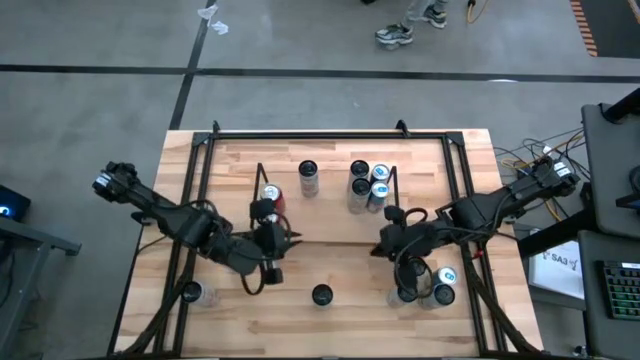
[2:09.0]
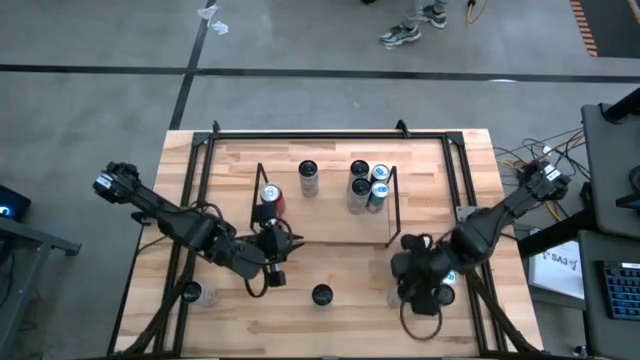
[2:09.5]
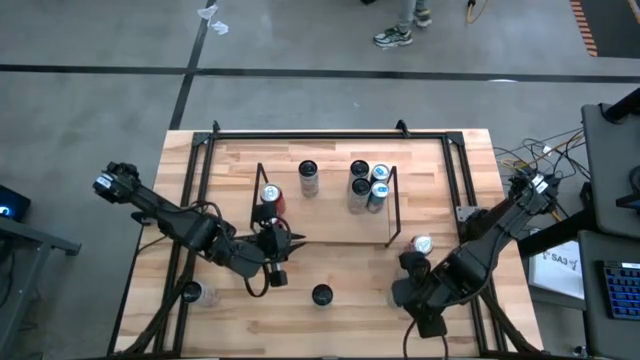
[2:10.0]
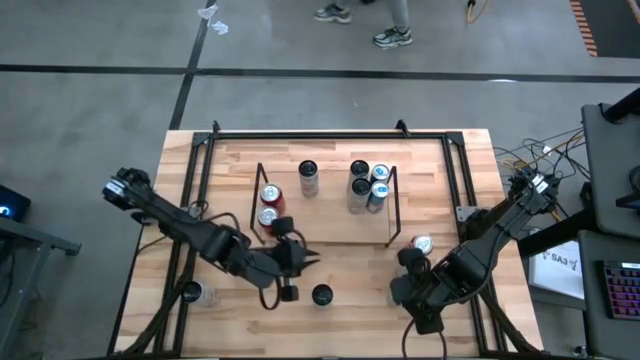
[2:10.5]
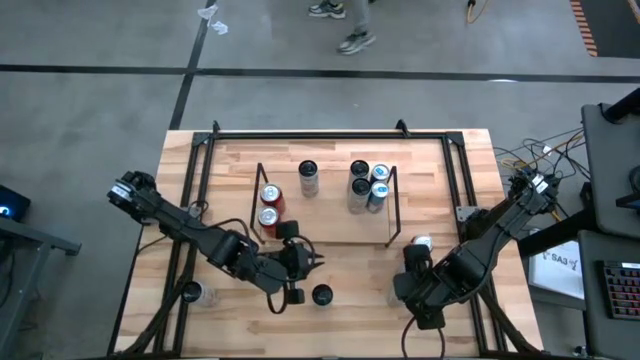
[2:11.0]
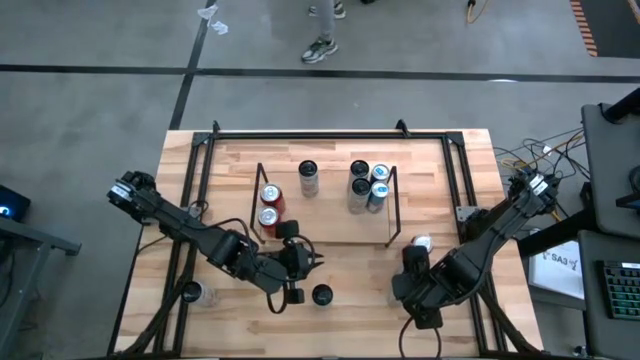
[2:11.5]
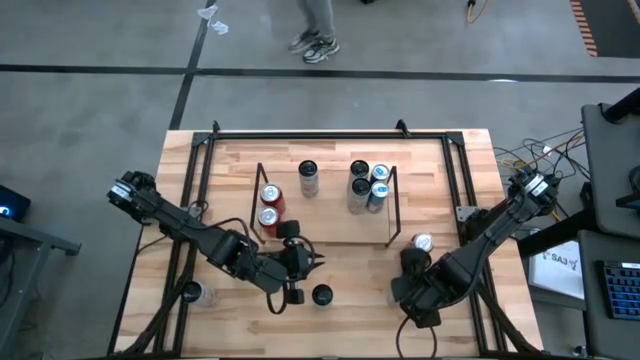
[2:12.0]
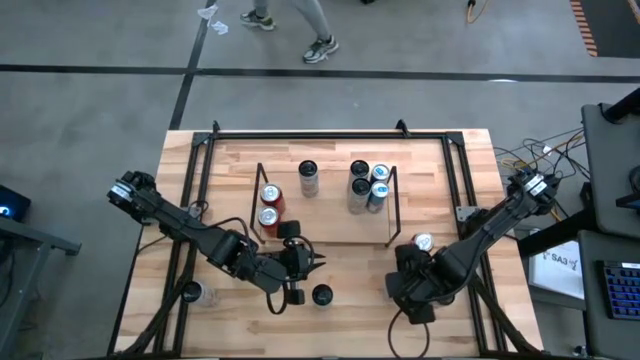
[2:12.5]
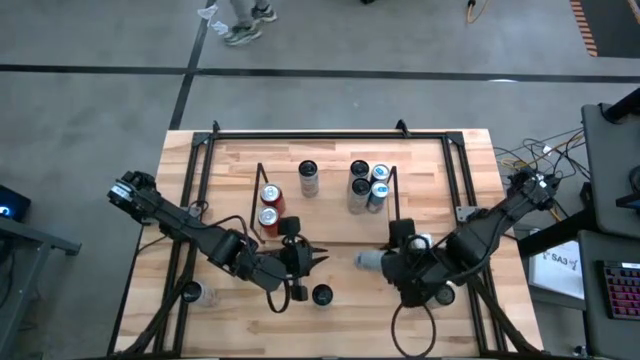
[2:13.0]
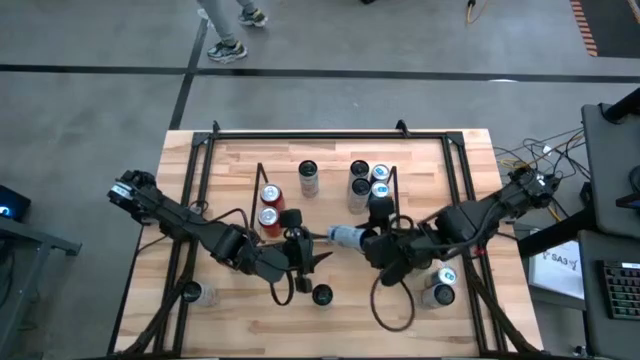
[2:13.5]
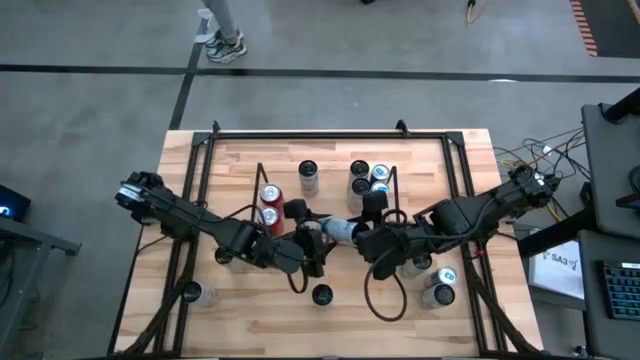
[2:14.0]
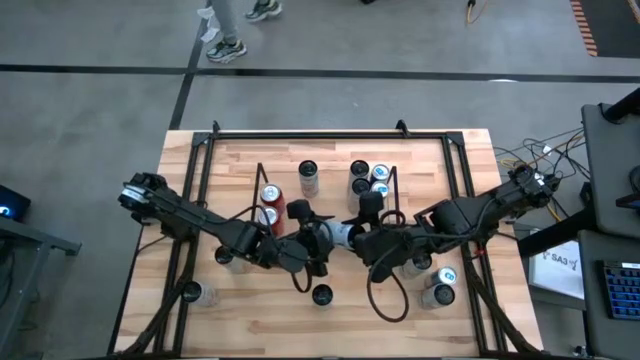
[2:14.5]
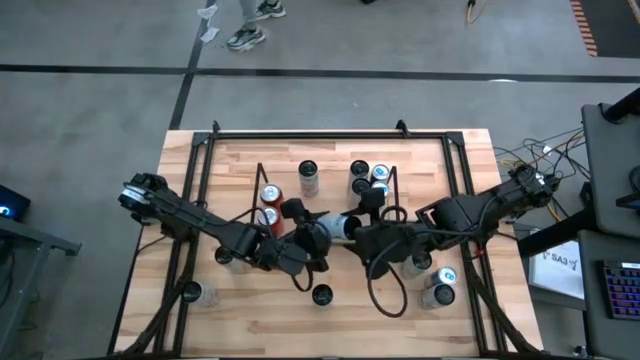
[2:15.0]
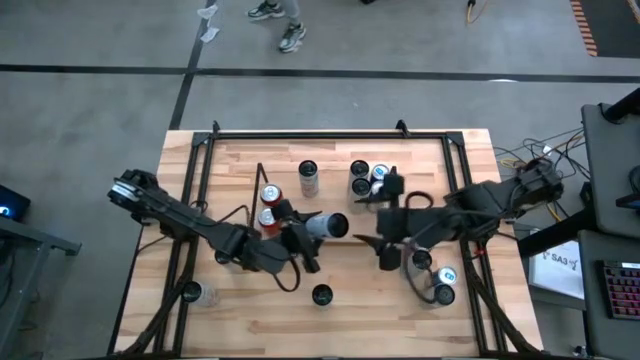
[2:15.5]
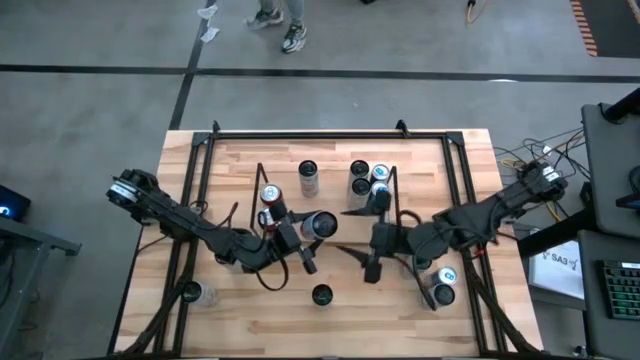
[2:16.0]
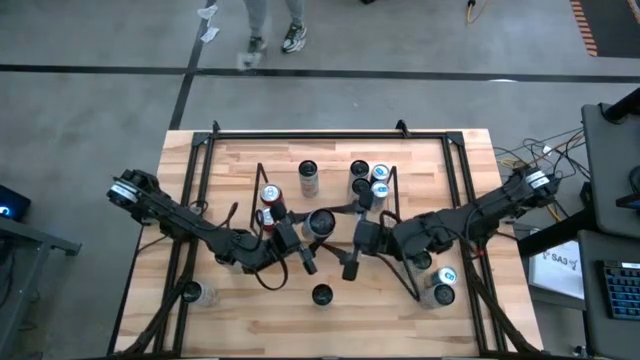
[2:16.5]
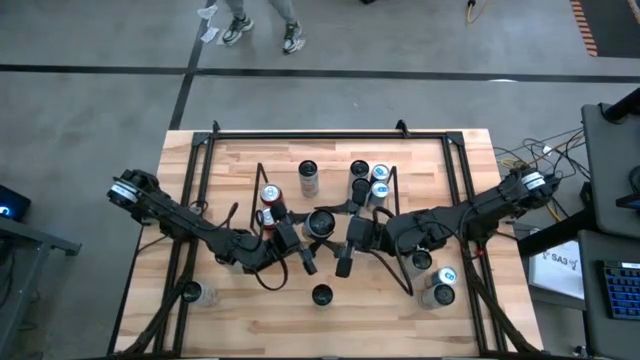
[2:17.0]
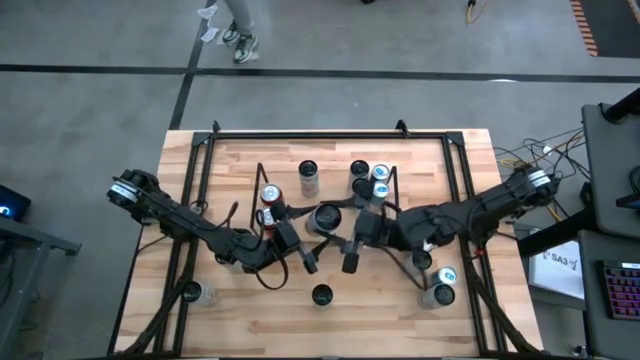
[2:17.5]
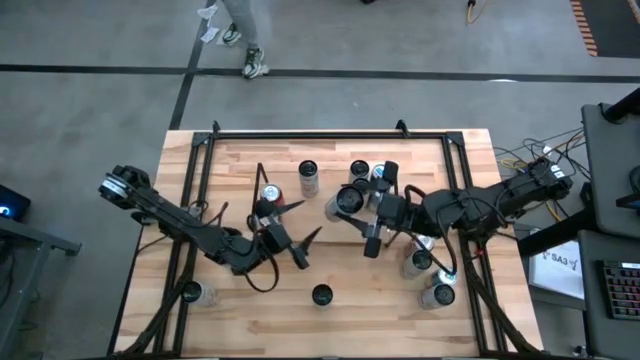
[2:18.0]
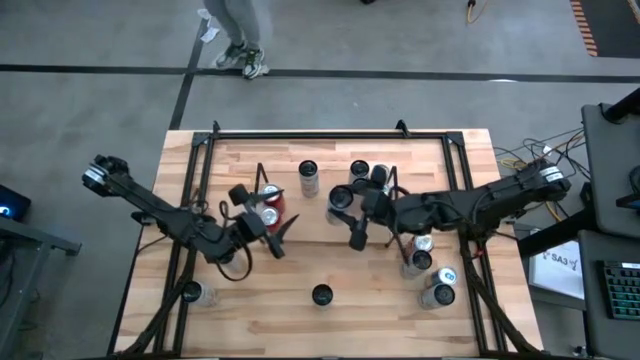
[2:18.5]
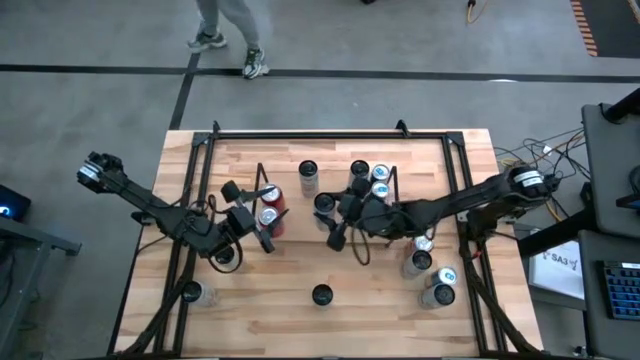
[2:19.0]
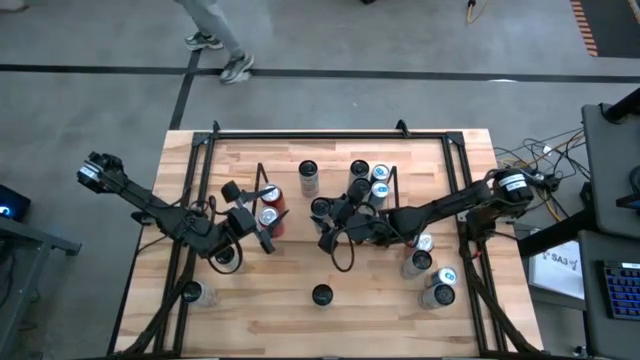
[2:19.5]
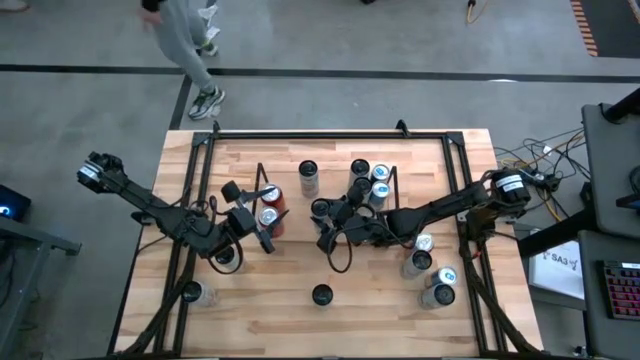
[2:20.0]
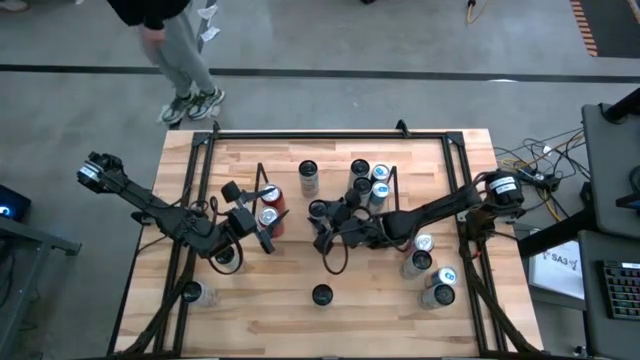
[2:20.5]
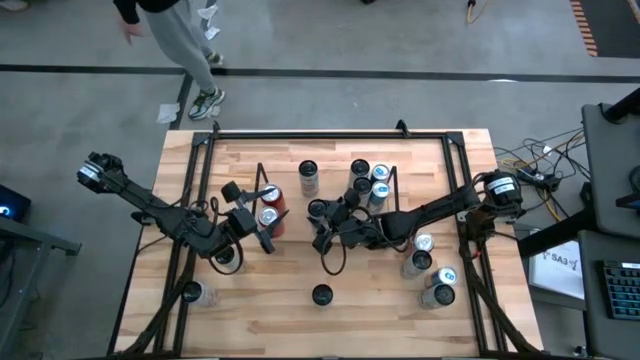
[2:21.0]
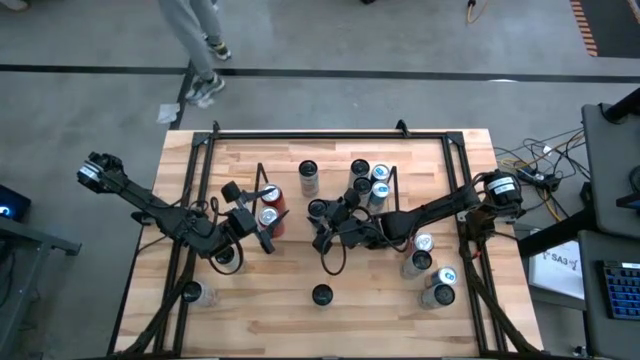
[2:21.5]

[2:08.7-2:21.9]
Task: Place canned beverage on shelf
Put the bottom left white and blue soda can on the shelf

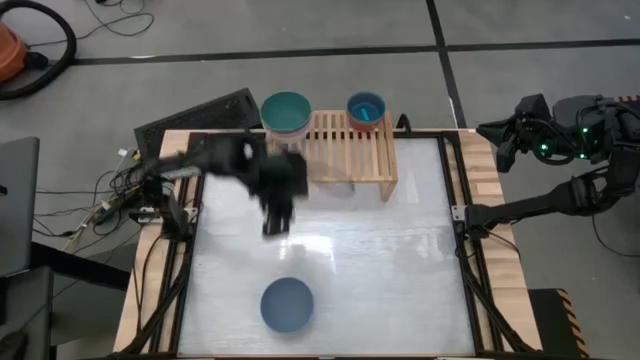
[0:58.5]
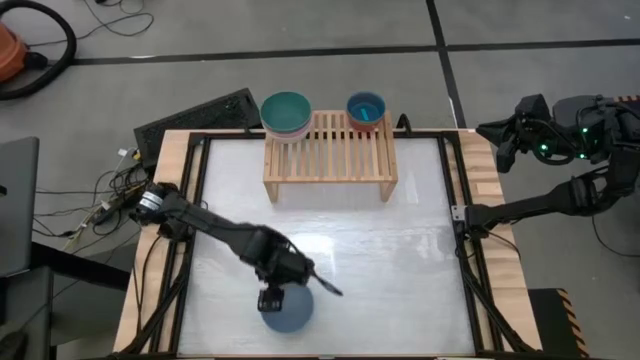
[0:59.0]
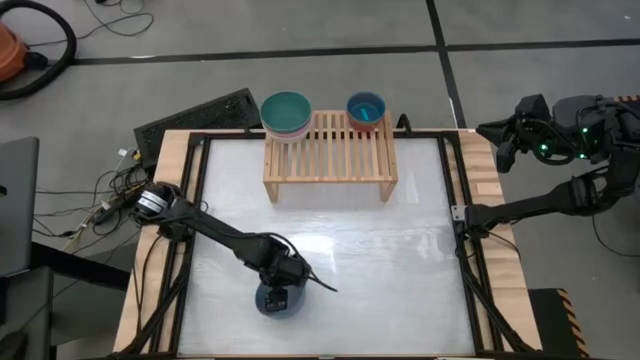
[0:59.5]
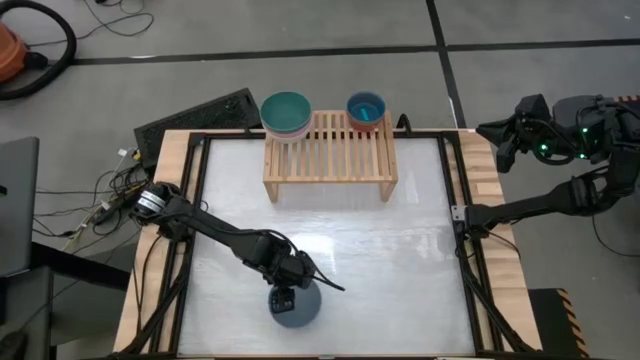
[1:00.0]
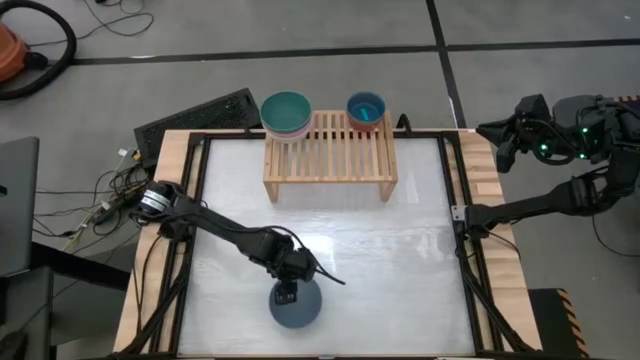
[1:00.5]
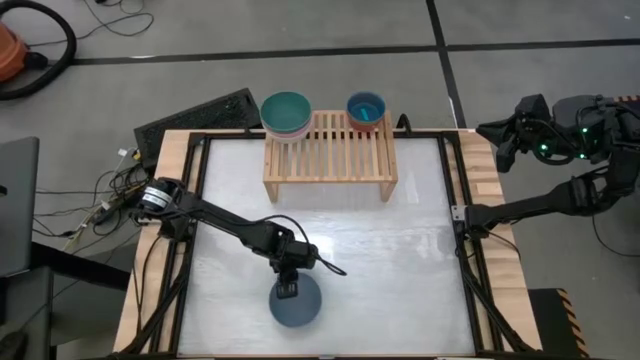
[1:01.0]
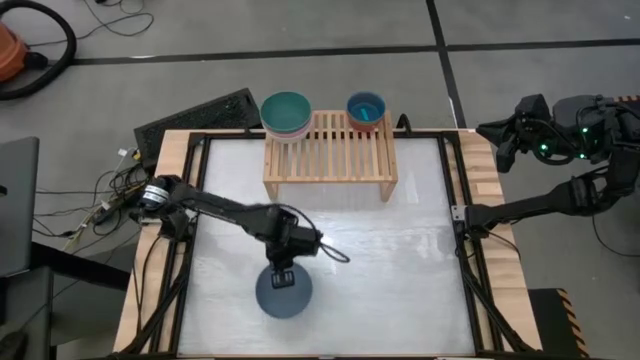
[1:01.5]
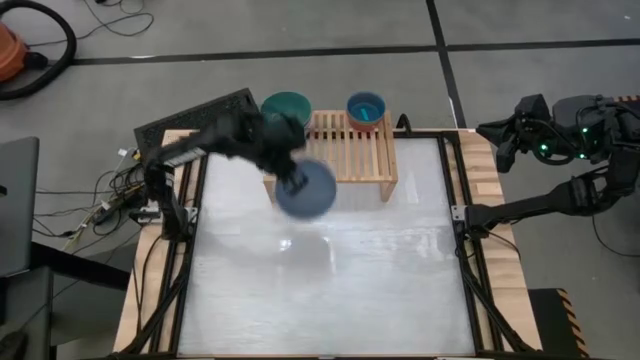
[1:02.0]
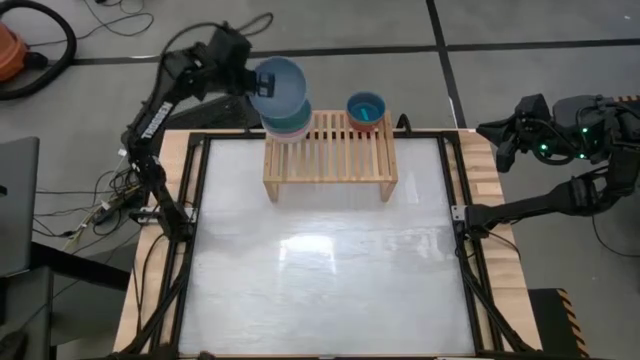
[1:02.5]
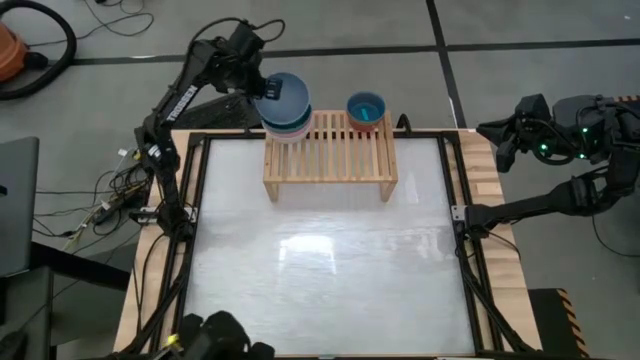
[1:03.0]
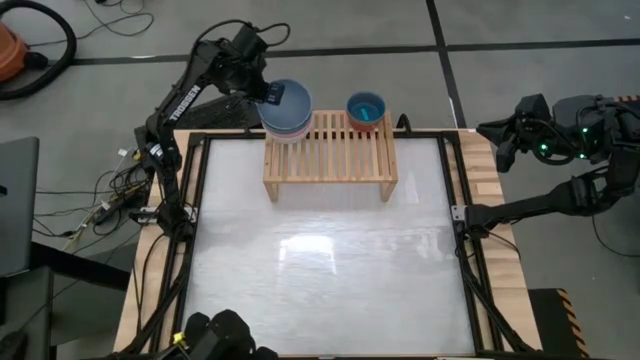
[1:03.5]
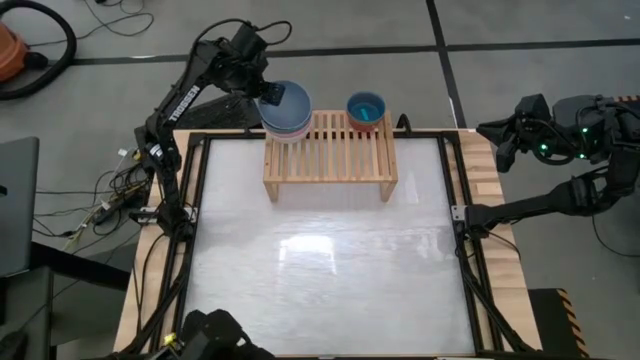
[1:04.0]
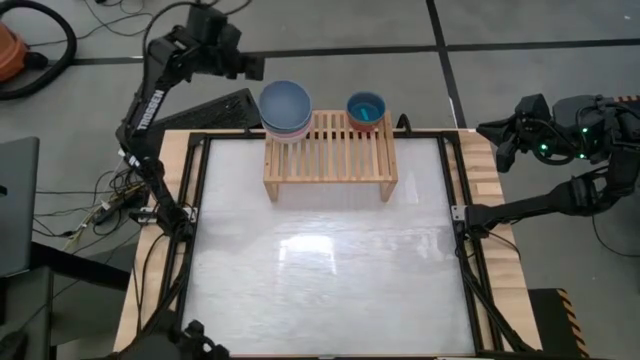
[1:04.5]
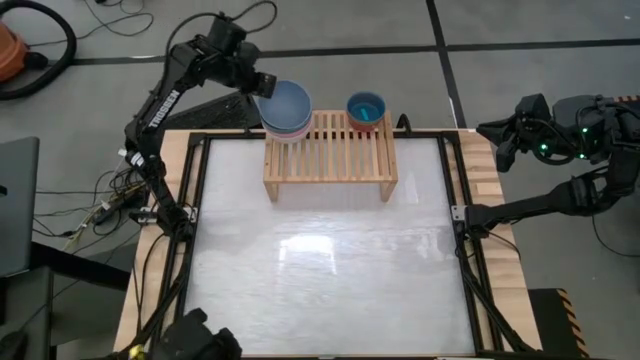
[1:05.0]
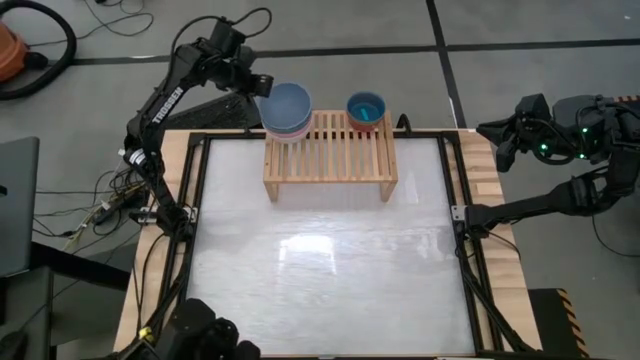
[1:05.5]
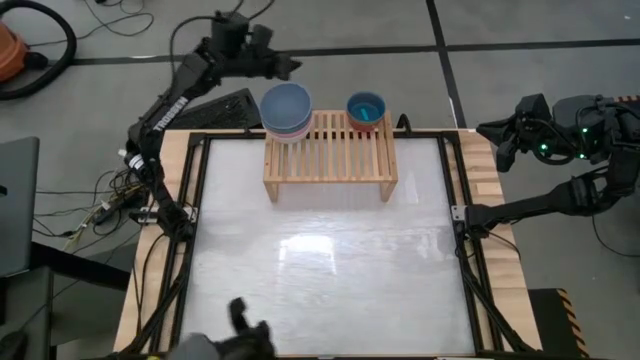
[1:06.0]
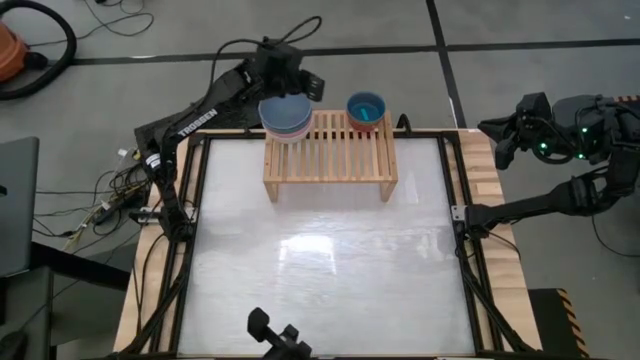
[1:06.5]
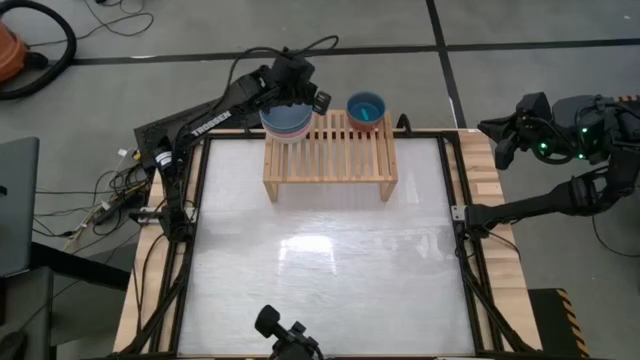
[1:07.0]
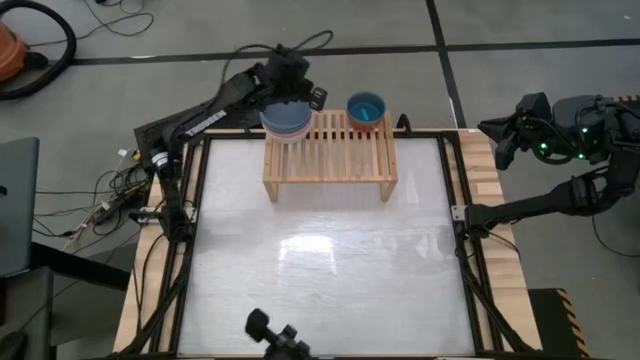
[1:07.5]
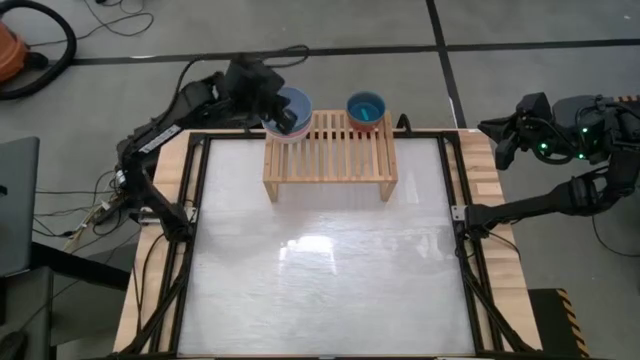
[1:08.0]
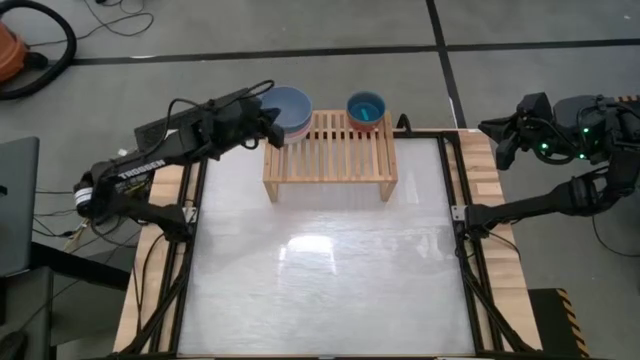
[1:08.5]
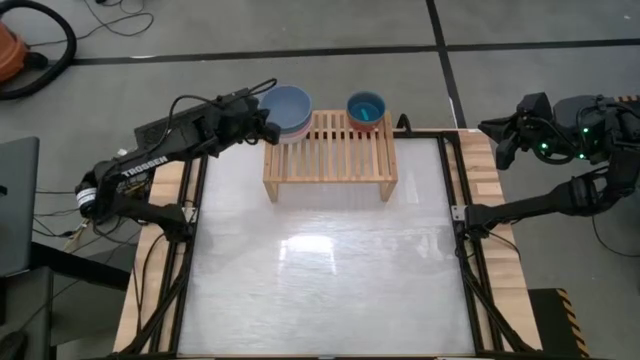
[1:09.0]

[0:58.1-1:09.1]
Task: Place and stack bowls onto a shelf
Stack the large blue bowl on top of the large green bowl
